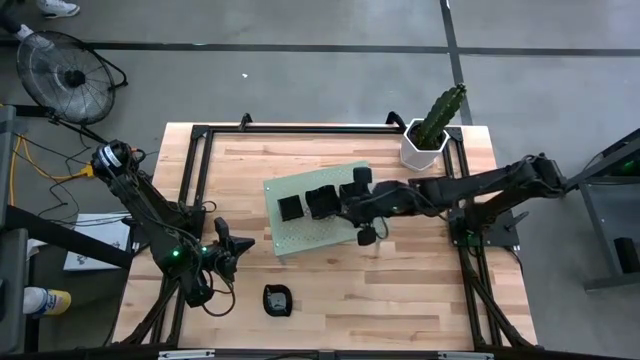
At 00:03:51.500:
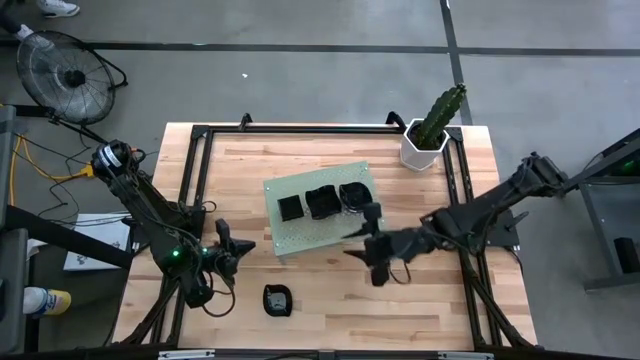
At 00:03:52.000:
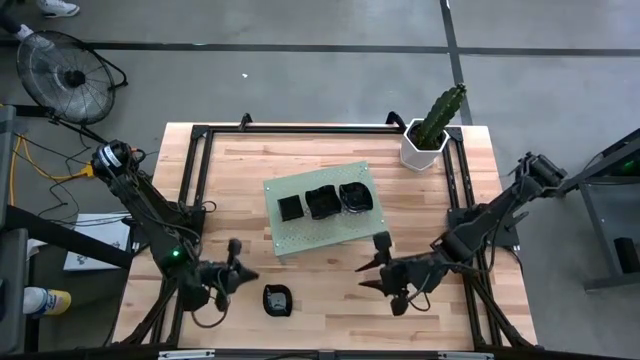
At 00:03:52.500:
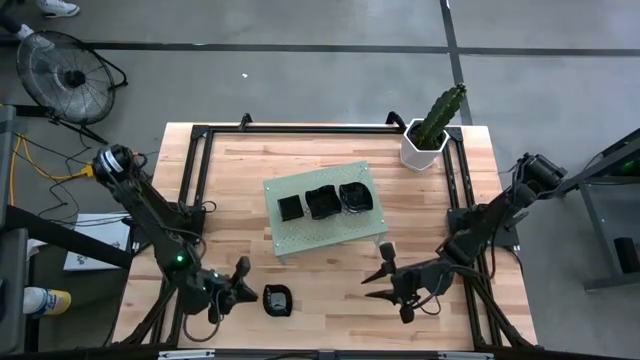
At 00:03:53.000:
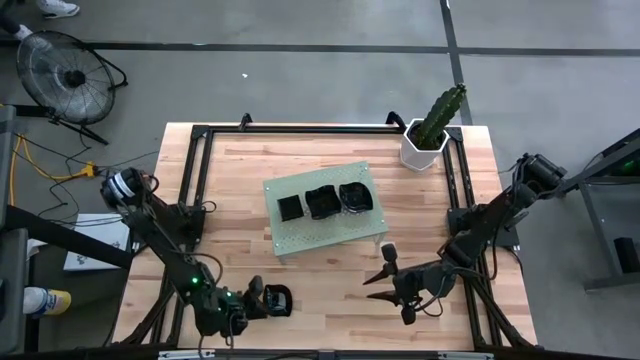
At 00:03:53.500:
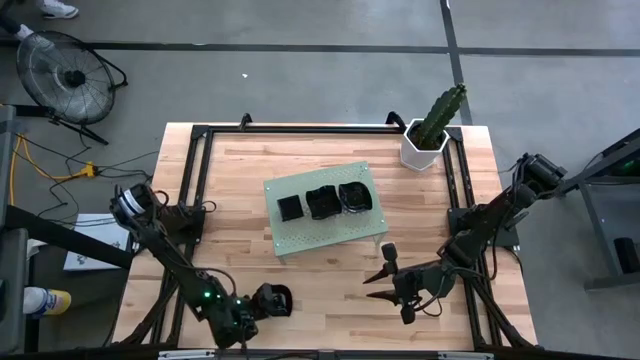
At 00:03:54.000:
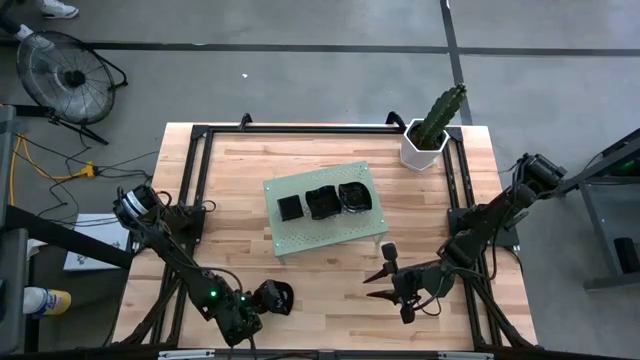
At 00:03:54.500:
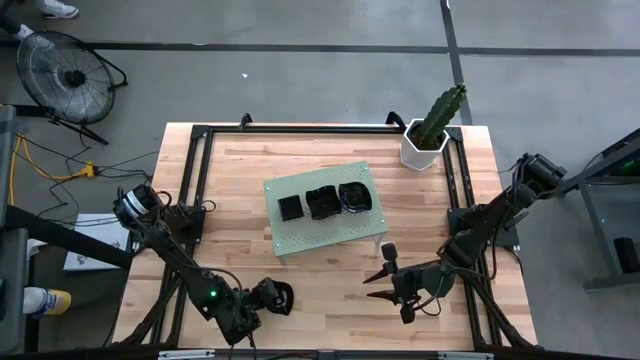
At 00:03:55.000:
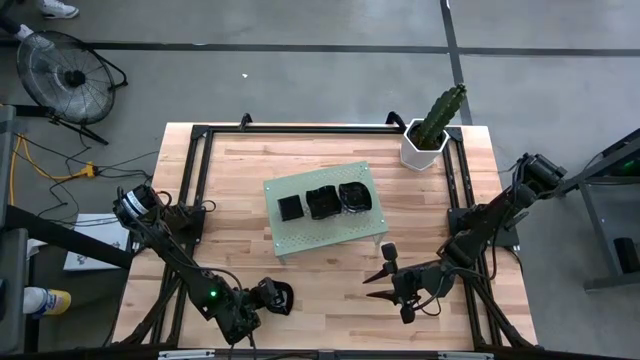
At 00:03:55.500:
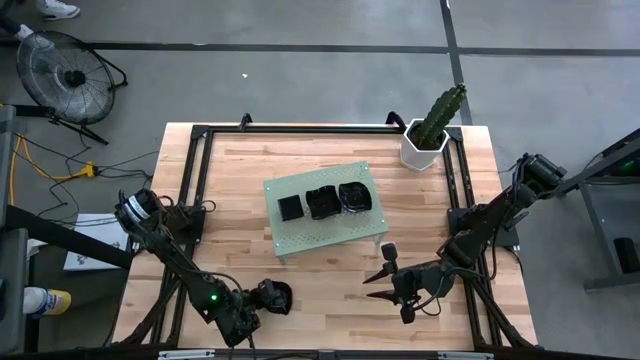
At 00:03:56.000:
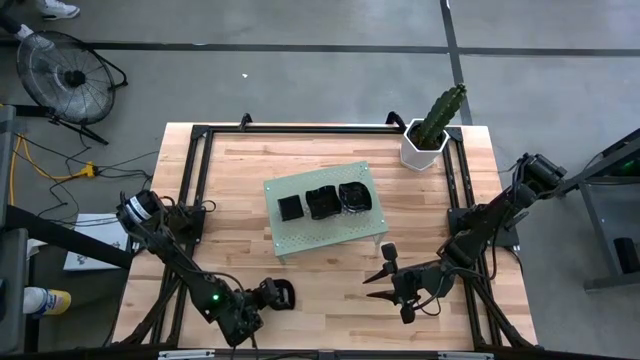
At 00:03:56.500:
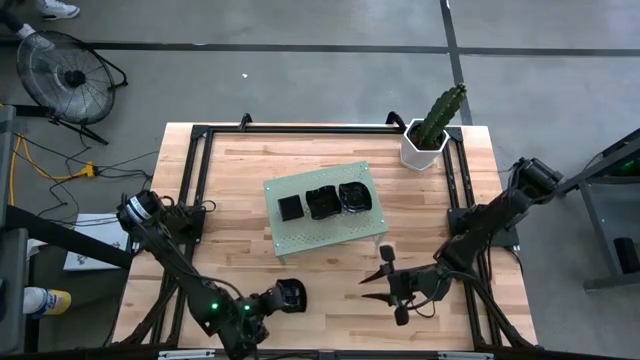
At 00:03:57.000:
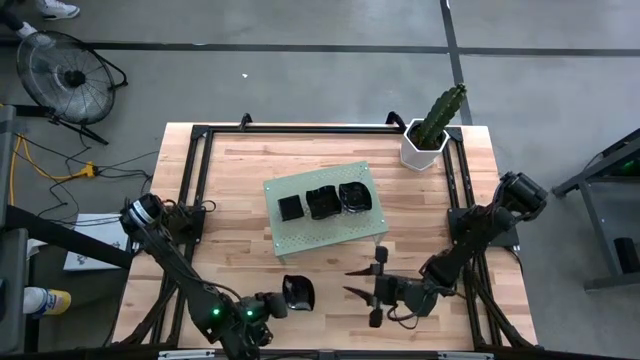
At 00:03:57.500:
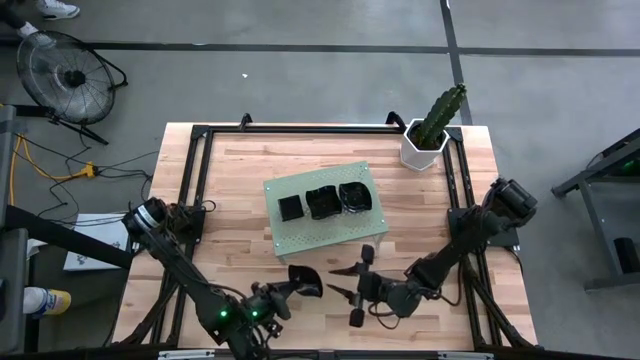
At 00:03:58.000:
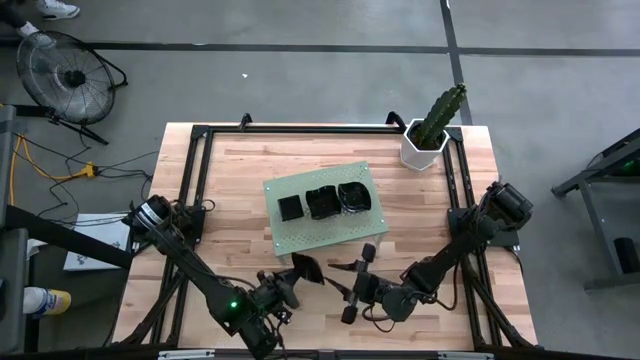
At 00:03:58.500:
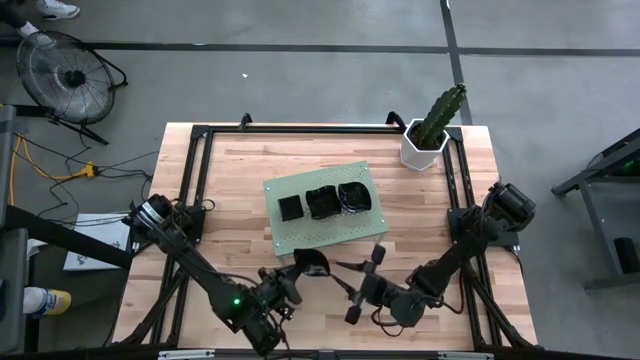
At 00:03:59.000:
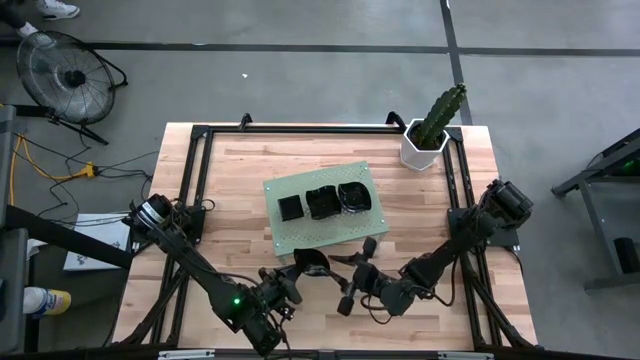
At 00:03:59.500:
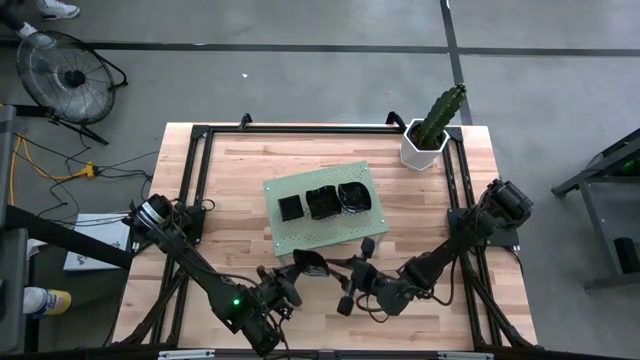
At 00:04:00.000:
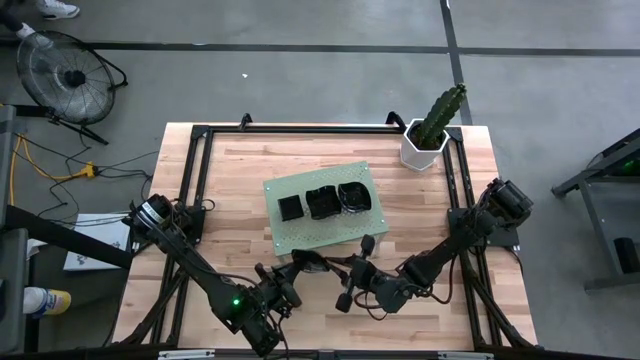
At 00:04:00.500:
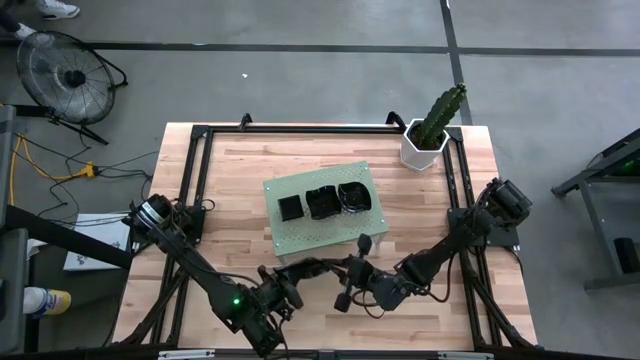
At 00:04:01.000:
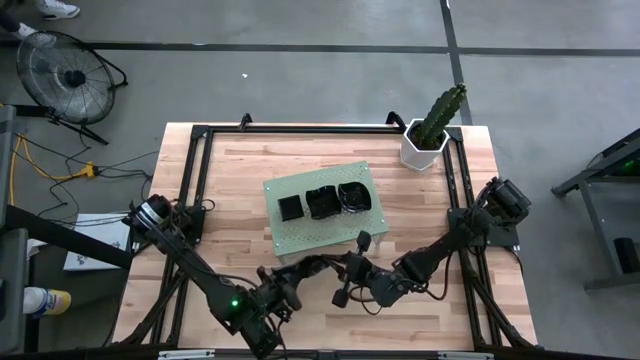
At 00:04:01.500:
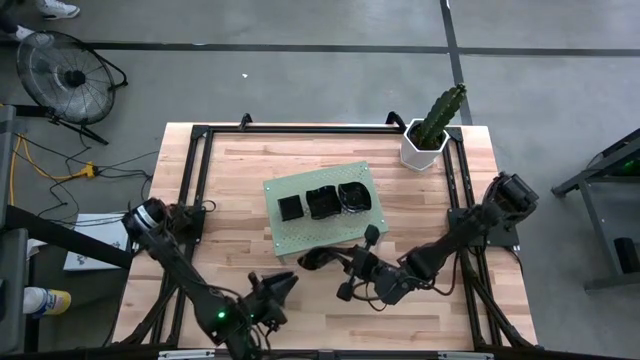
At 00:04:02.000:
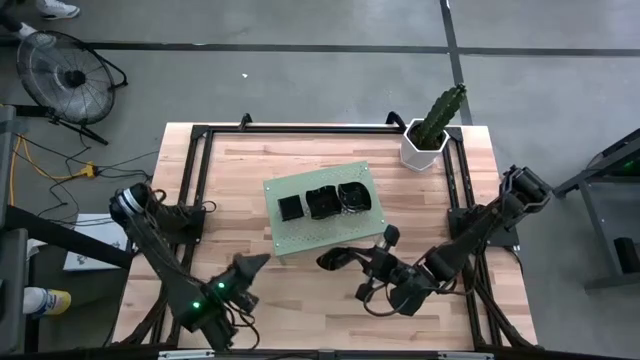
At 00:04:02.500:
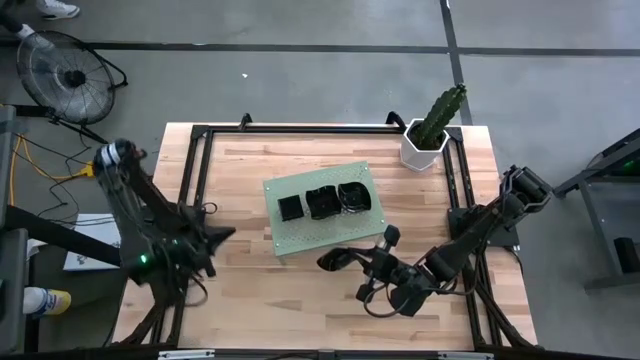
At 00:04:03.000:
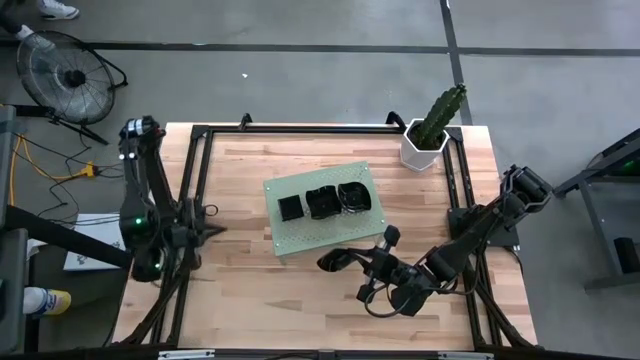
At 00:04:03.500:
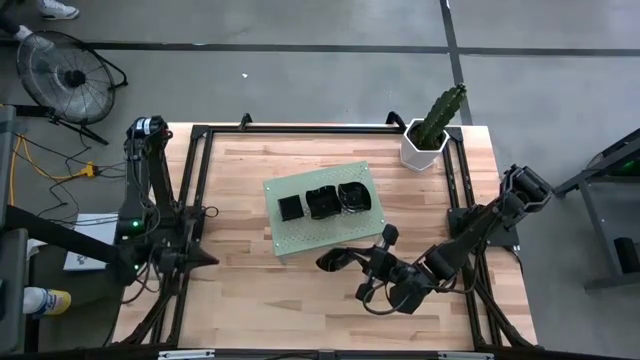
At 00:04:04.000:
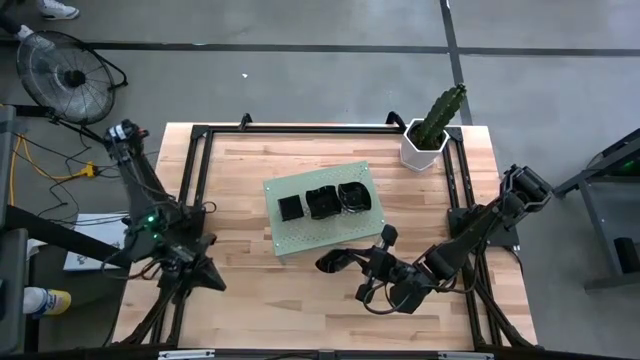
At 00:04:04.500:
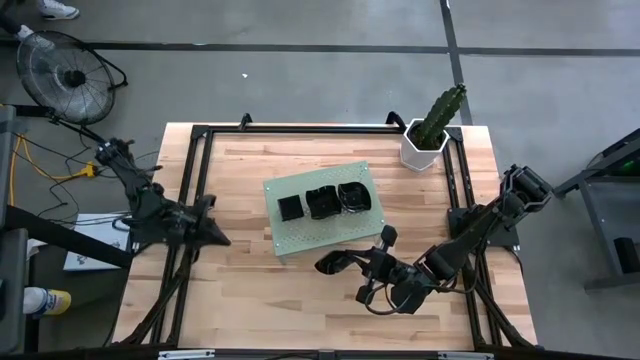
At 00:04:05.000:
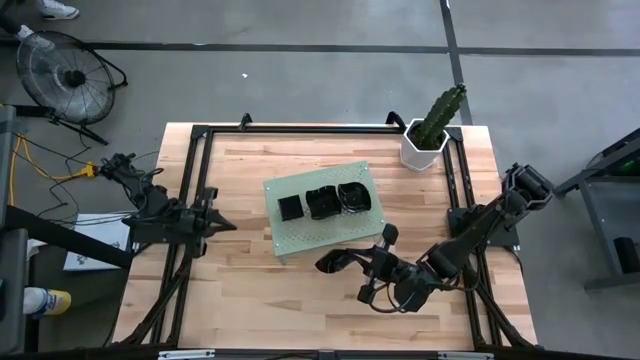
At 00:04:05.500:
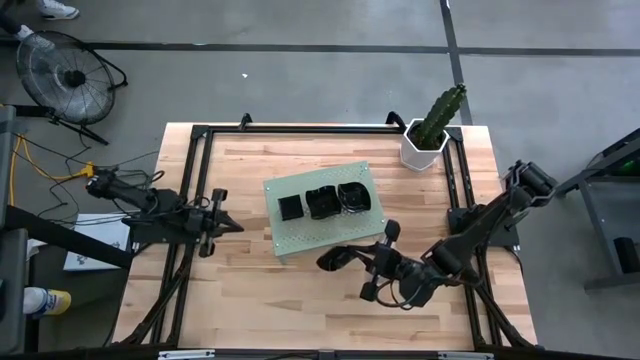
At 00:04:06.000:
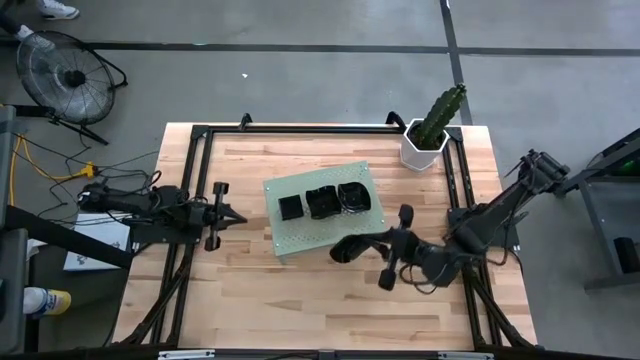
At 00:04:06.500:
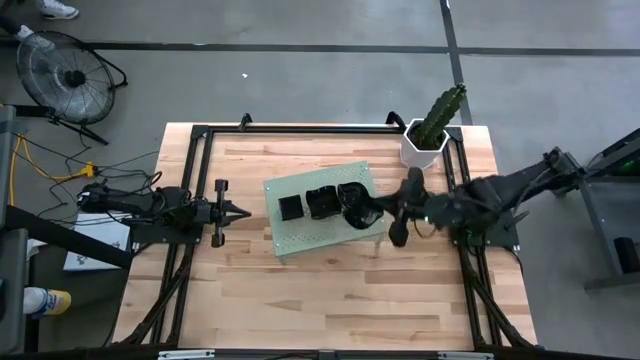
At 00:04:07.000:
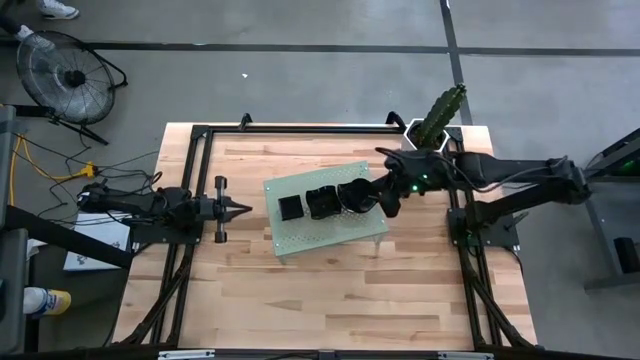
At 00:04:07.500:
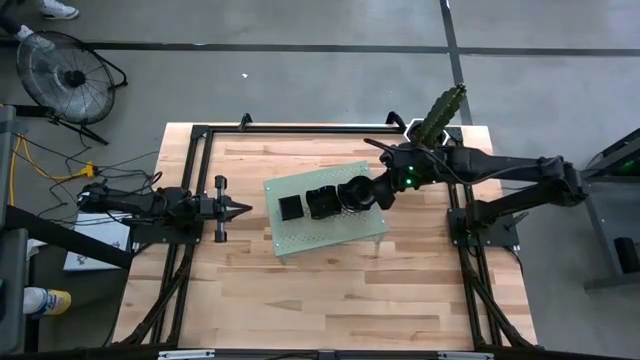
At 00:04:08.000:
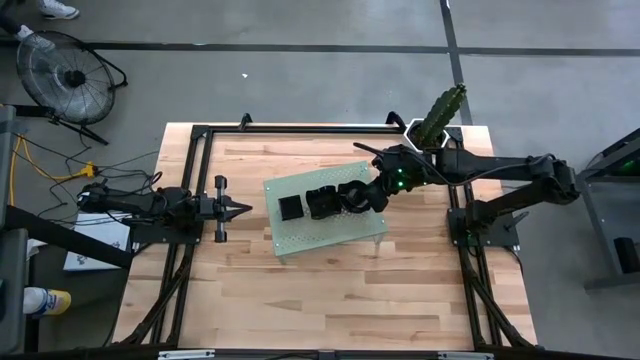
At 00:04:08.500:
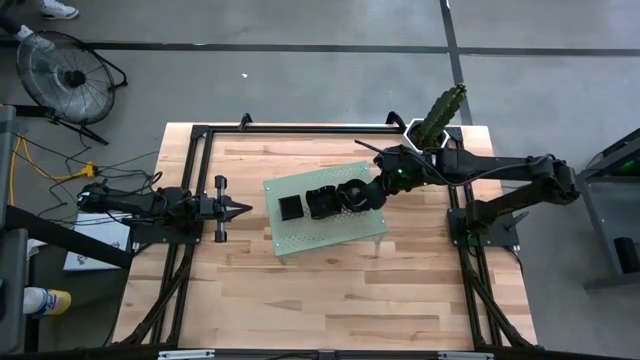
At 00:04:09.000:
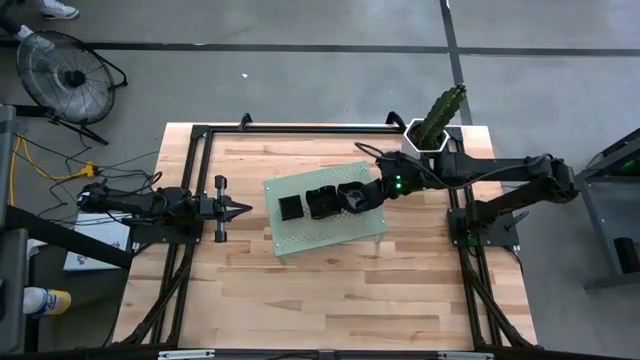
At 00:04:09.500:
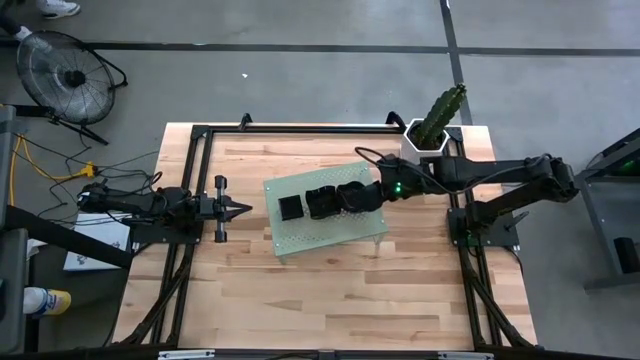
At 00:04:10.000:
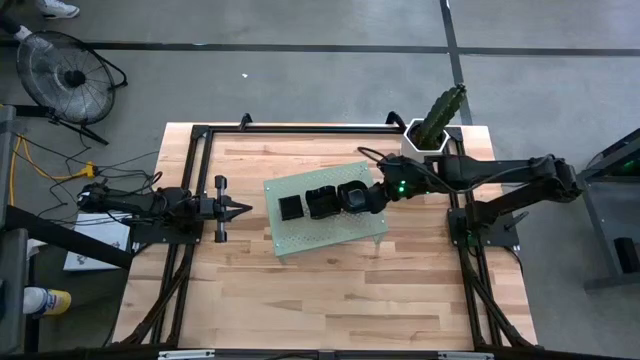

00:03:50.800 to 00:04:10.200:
Task: Pick & Place Mini shaped plates
Stack the black leaf shaped bowl on top of the black leaf shaped bowl on the shelf

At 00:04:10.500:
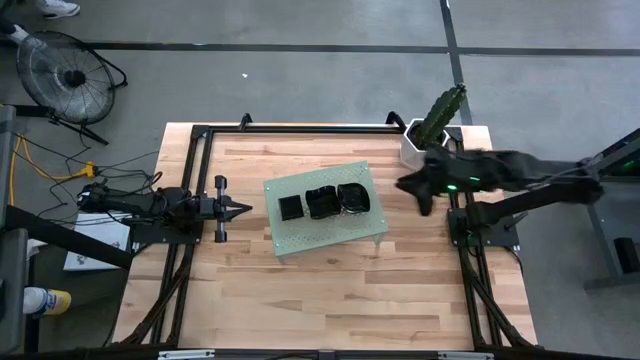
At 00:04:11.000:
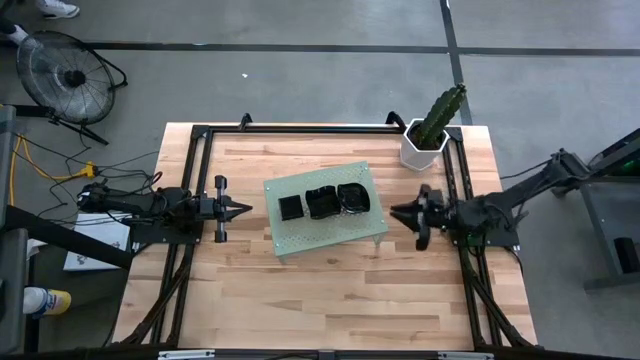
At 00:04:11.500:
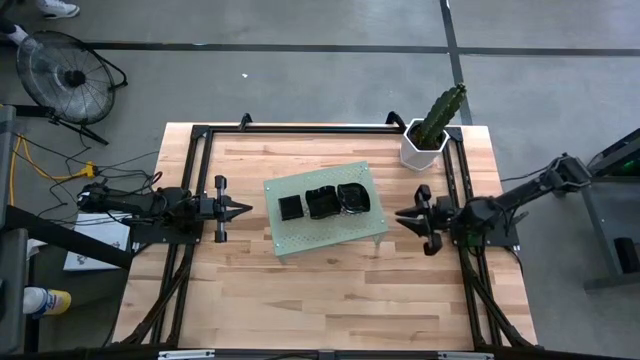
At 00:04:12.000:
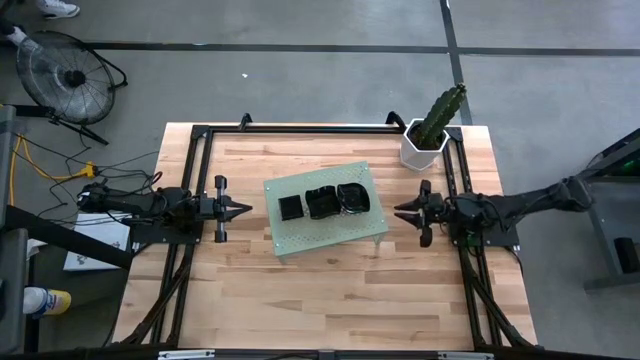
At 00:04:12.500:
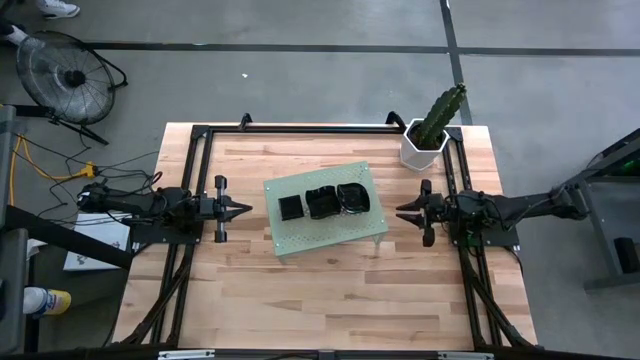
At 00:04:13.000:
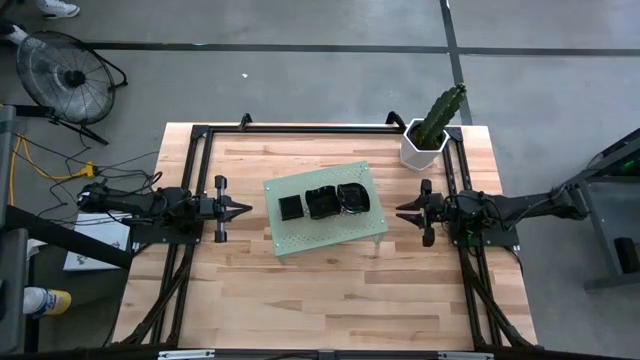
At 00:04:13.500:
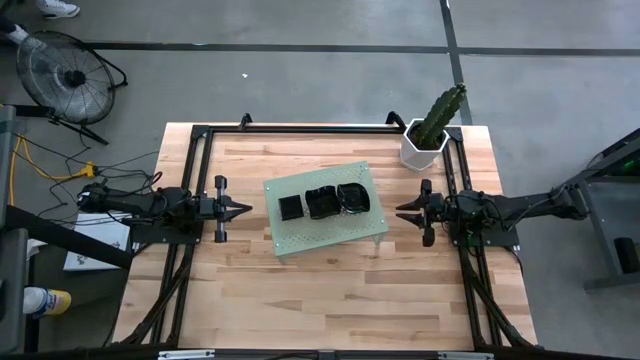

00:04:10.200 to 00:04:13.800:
Return to Home Position
